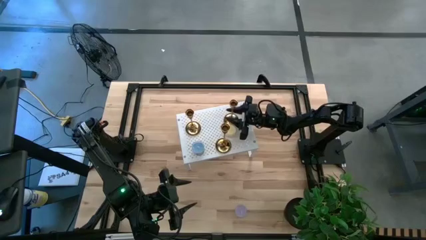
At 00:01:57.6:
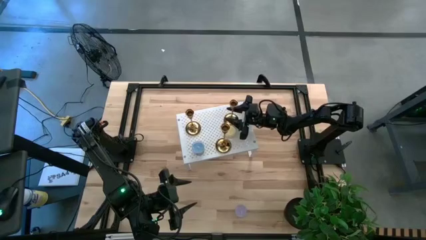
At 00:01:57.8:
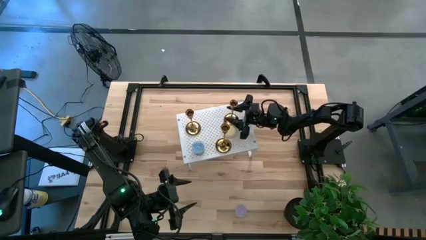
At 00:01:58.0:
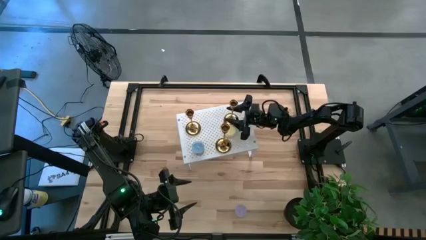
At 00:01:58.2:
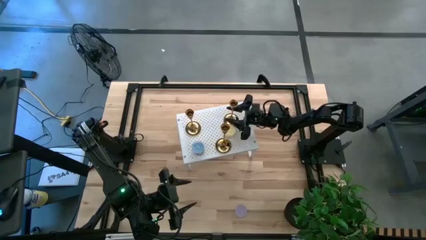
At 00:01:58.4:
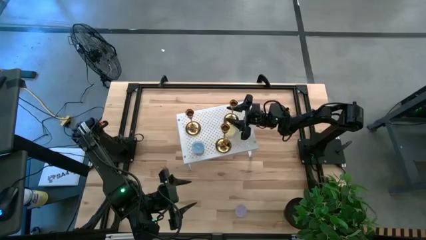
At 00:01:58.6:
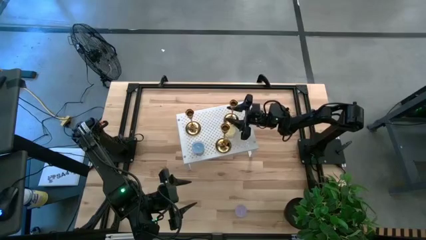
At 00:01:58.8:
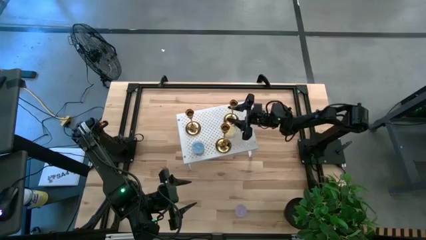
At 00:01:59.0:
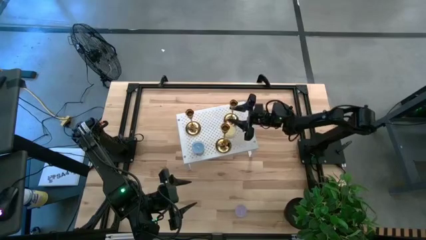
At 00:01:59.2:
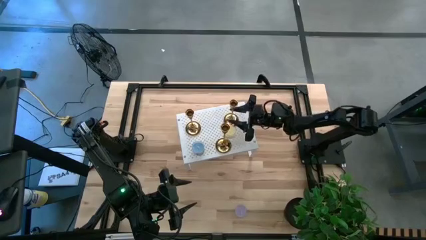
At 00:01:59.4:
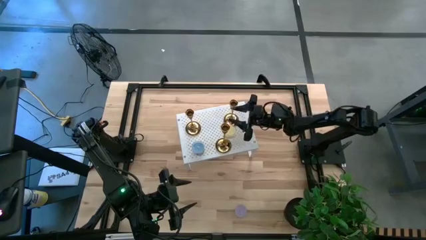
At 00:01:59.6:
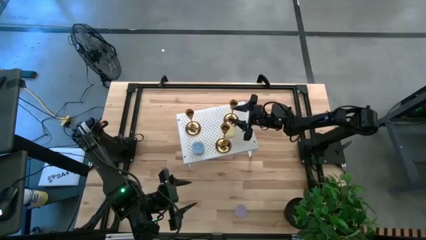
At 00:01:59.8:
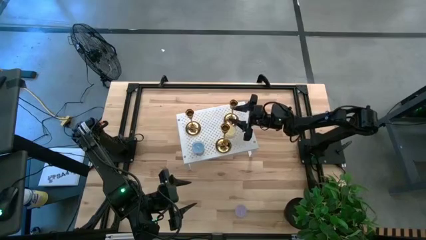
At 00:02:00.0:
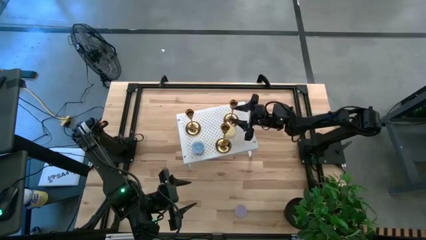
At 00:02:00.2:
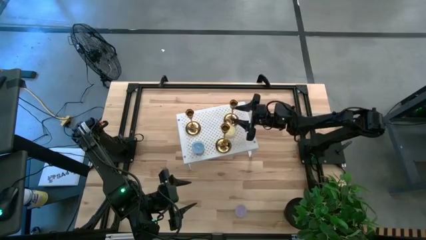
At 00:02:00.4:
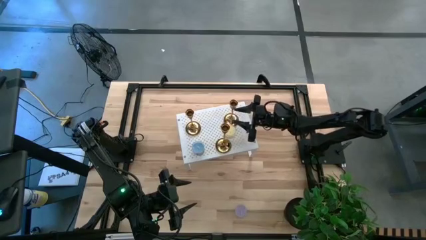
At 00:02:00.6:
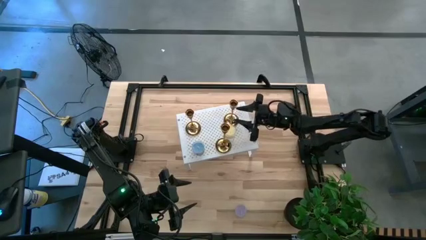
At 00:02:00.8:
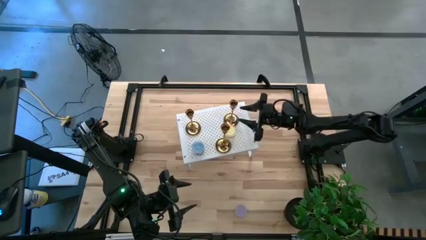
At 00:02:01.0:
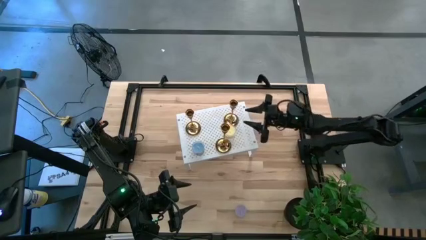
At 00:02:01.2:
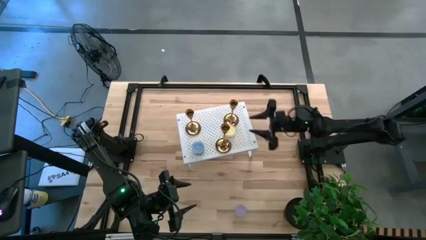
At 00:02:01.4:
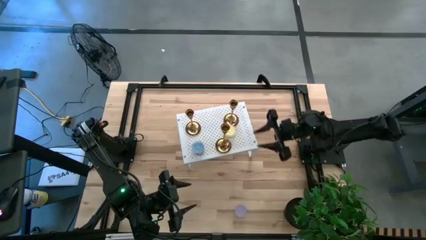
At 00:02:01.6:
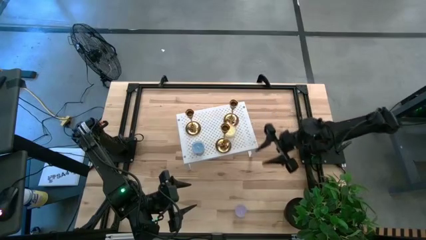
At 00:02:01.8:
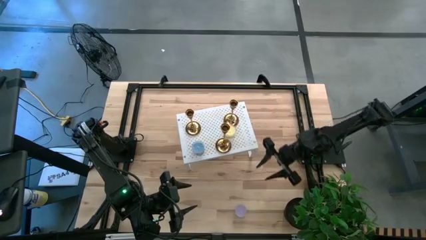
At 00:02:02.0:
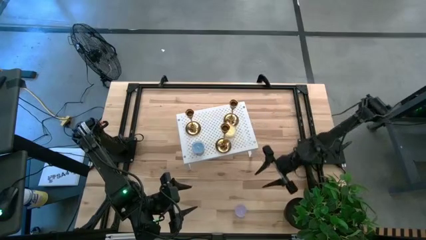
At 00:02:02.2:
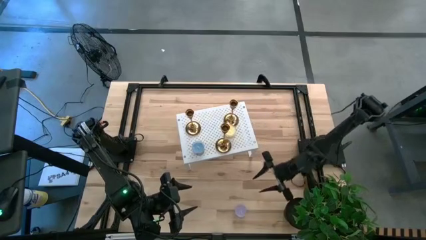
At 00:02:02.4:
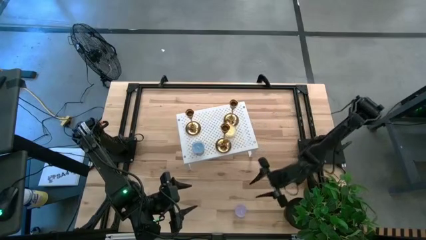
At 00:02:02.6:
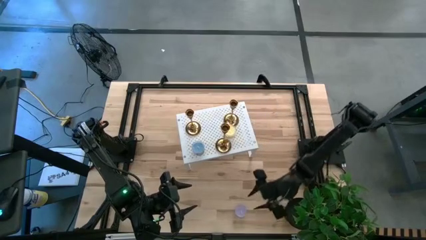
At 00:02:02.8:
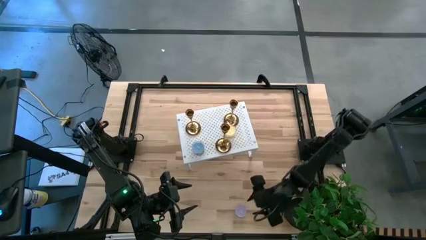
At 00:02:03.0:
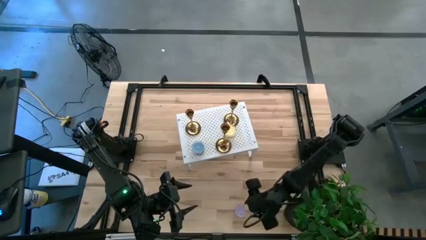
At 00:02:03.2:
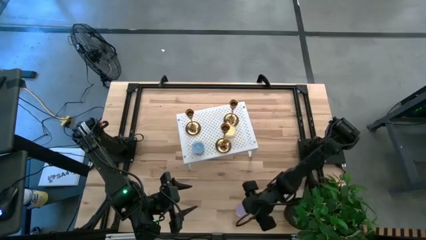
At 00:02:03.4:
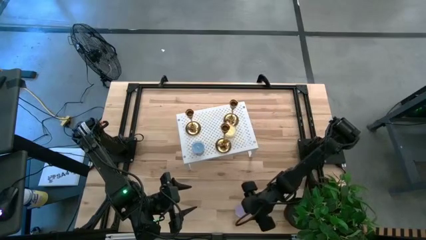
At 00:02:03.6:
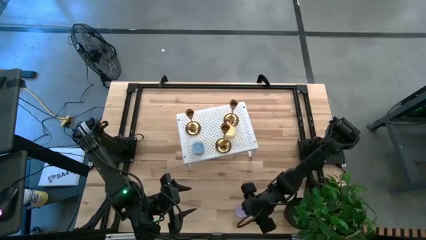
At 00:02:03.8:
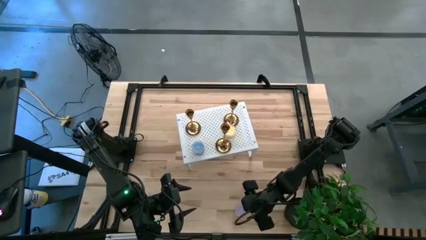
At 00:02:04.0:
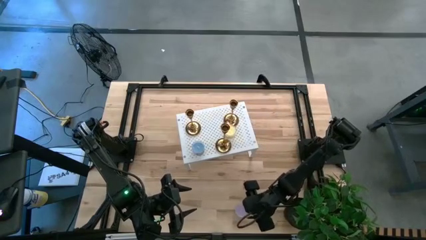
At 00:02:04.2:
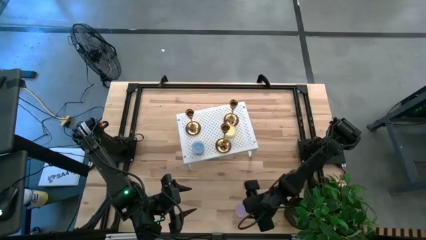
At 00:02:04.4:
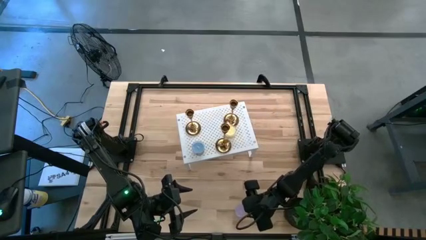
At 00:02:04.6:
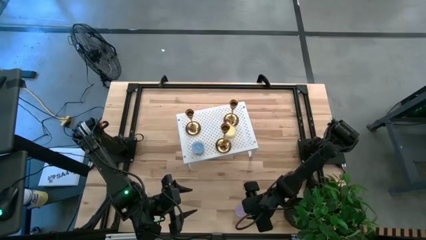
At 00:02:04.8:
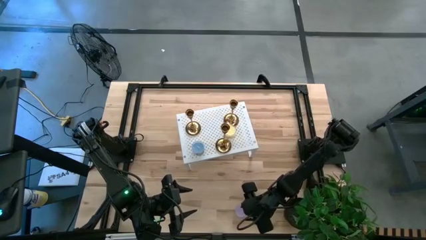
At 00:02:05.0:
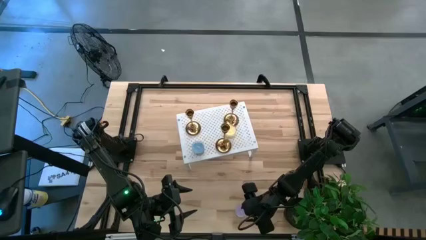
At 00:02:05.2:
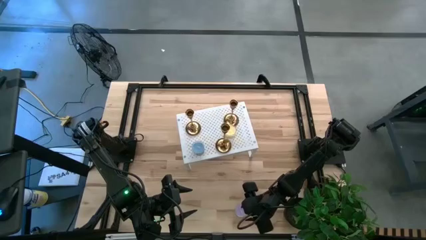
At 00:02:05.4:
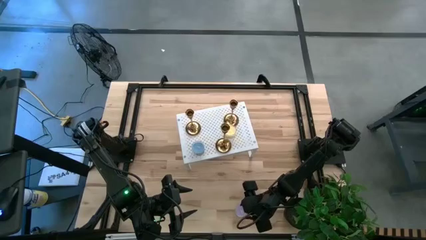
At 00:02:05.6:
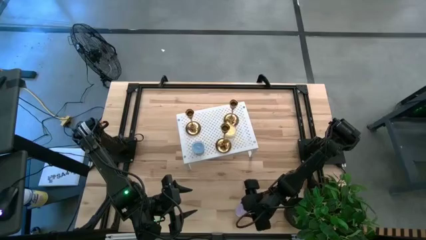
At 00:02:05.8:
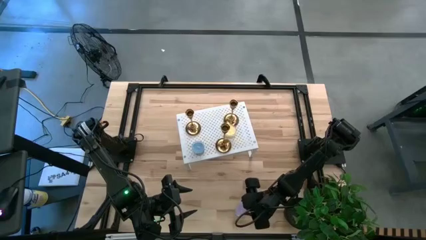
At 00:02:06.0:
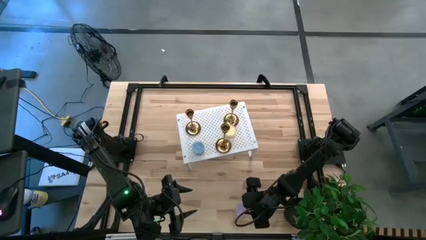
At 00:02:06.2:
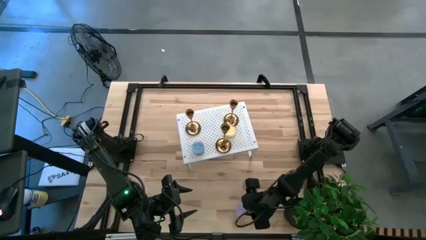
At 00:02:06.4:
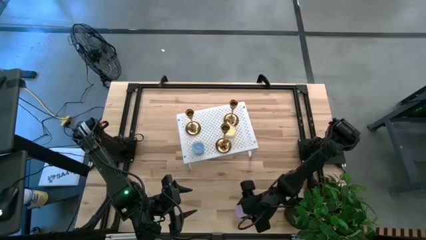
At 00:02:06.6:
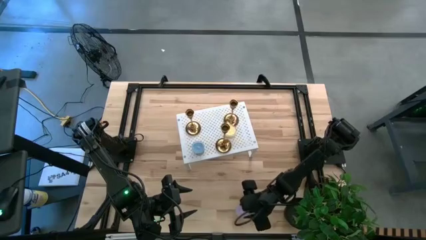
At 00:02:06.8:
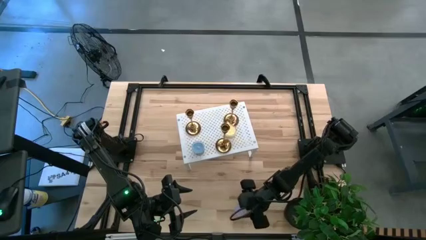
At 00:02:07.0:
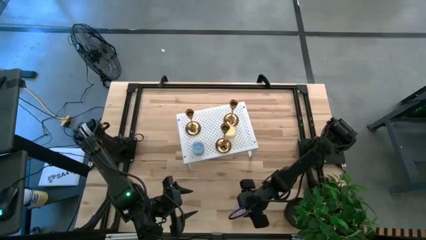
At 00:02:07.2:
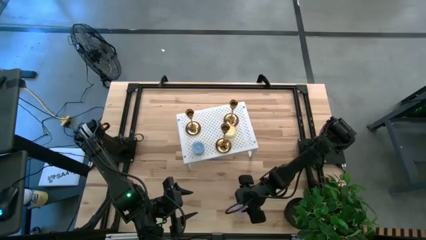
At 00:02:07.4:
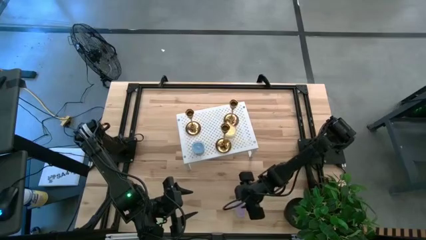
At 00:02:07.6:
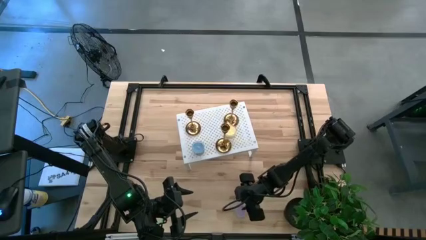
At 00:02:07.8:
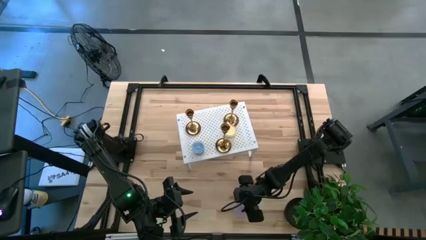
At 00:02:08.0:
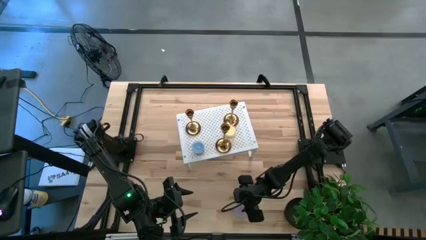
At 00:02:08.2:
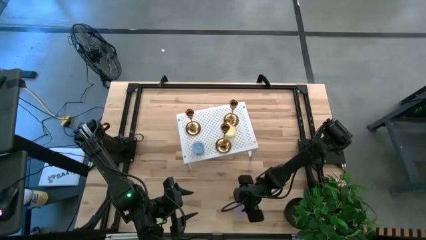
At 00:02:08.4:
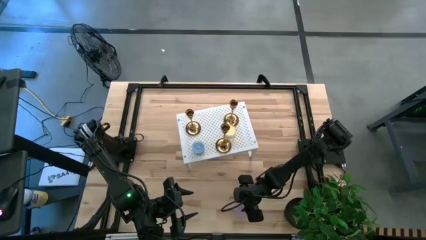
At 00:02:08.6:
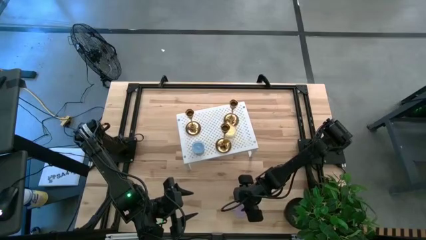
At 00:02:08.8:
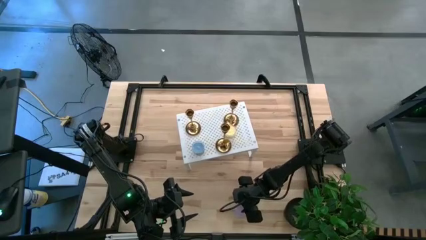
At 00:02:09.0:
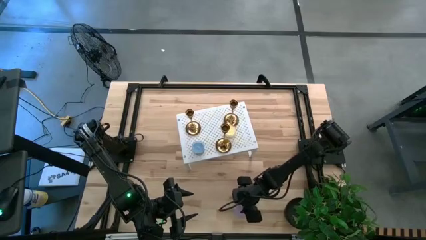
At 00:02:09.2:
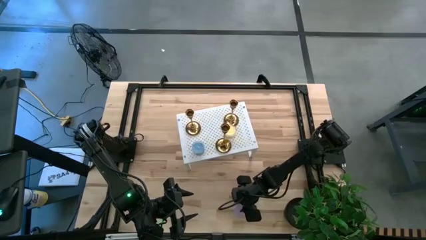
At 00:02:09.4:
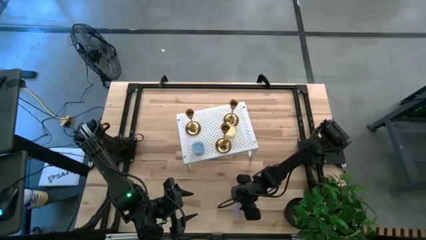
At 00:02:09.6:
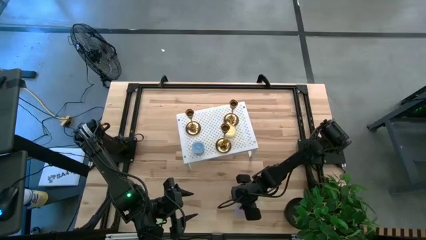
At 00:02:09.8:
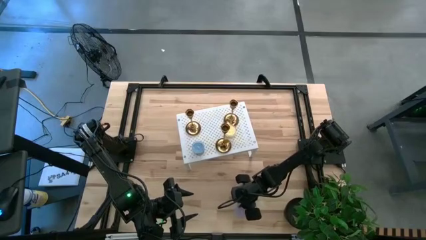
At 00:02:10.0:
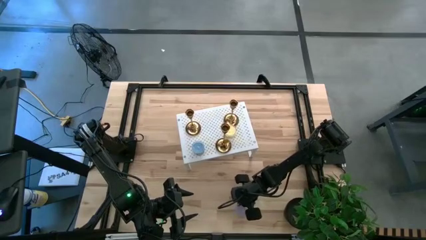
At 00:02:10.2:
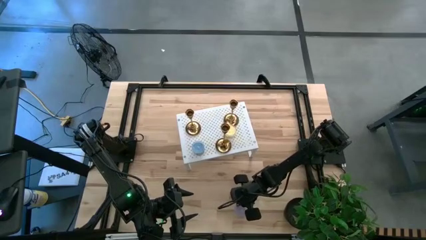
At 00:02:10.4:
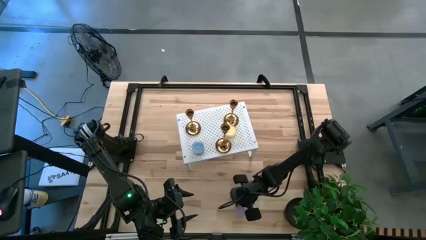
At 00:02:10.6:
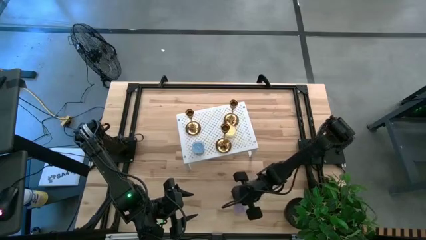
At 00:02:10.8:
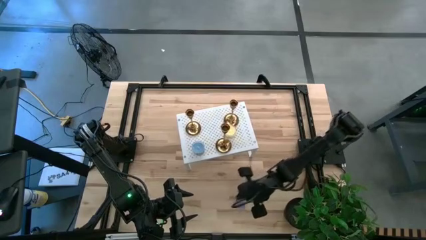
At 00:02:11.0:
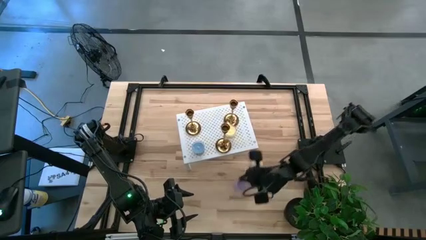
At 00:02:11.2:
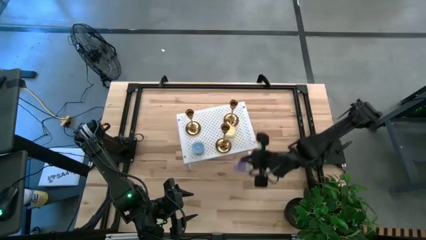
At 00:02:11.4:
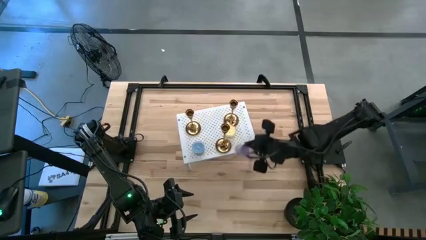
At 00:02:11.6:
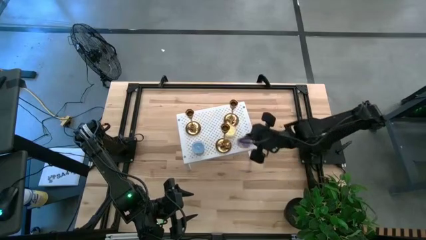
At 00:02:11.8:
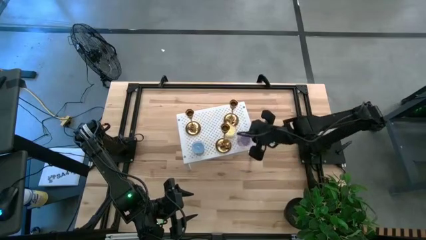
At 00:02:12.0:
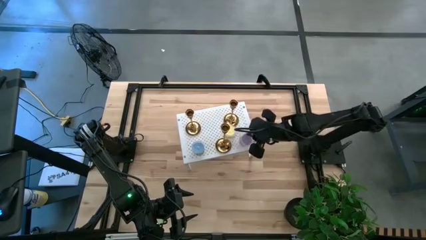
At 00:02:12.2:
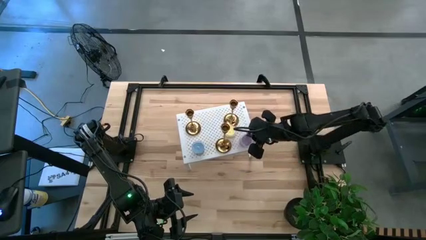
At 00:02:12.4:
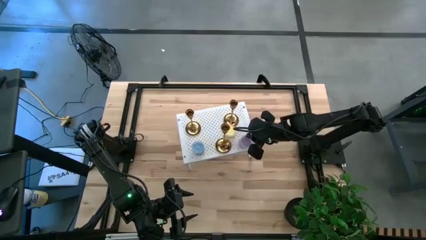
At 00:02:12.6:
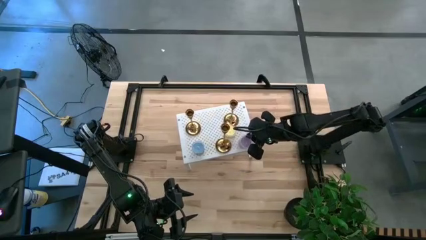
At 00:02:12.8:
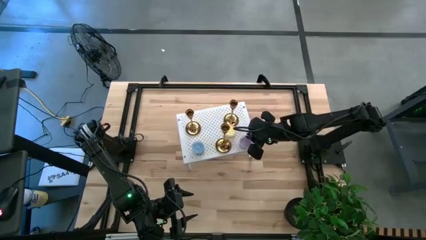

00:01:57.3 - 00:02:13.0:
Task: Pick & Place candle stick holders
Put the purple scented candle on the shelf
